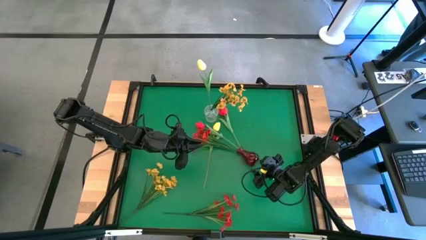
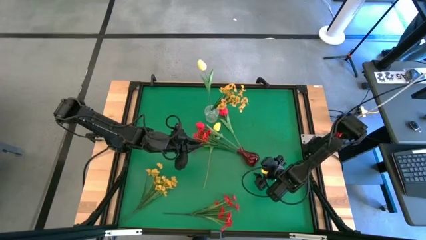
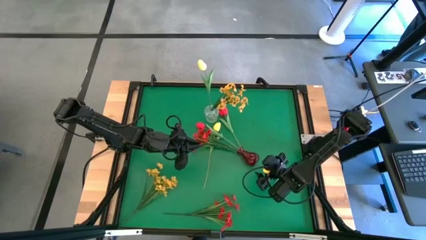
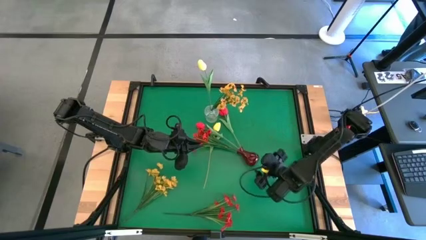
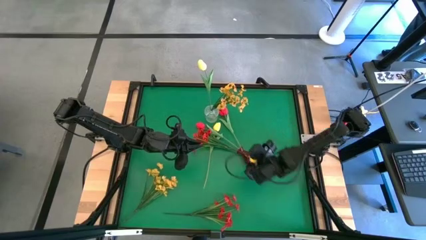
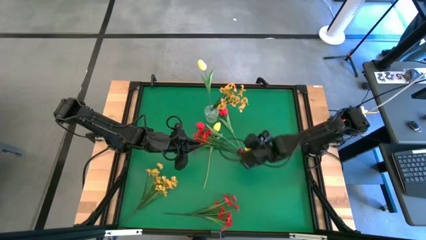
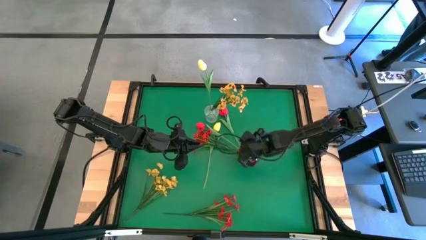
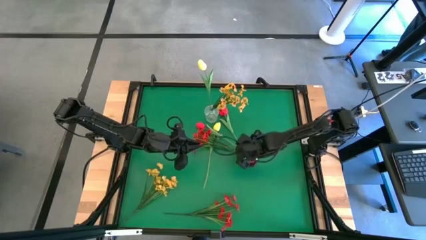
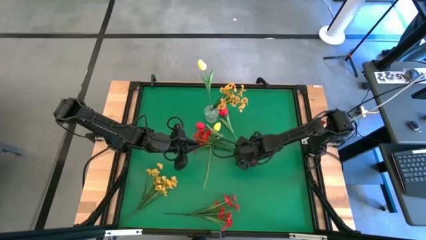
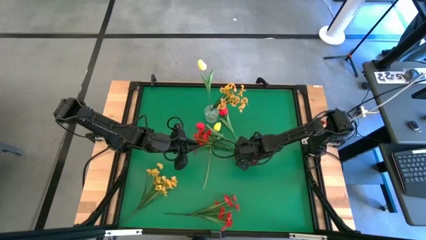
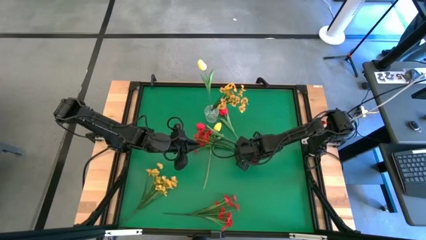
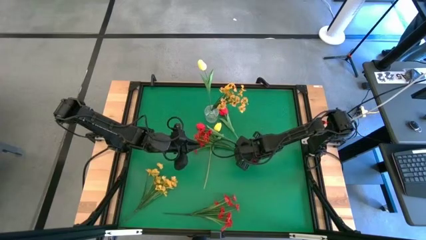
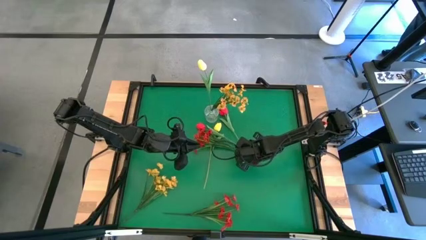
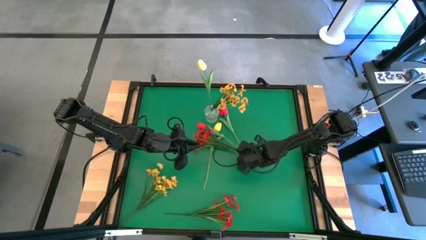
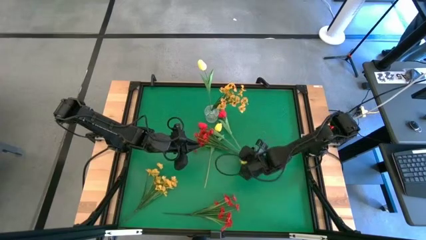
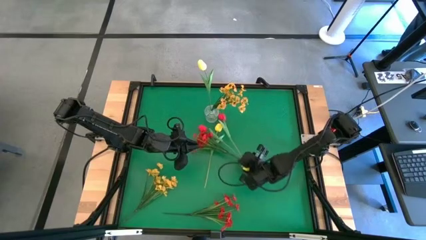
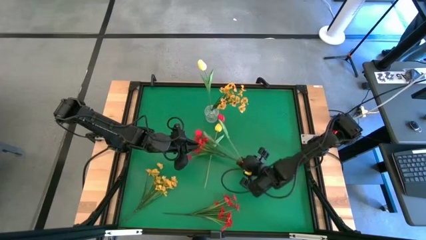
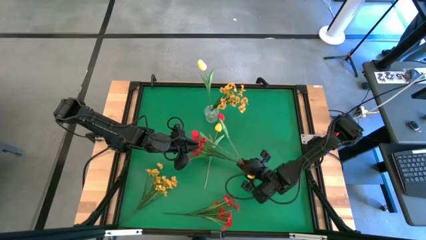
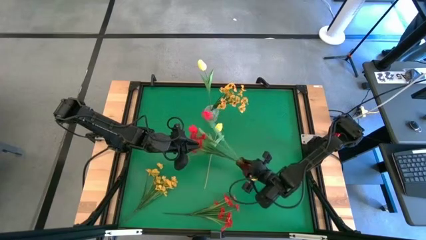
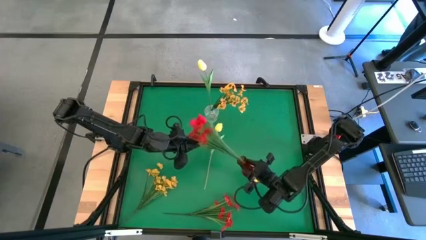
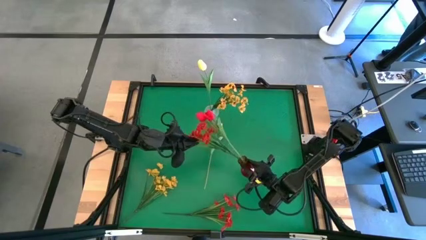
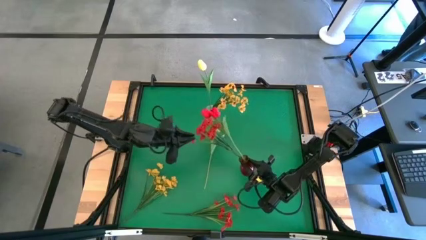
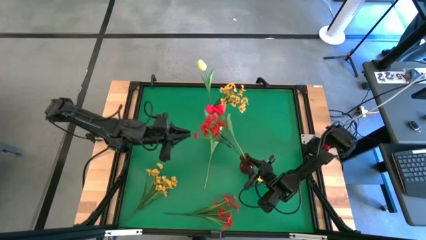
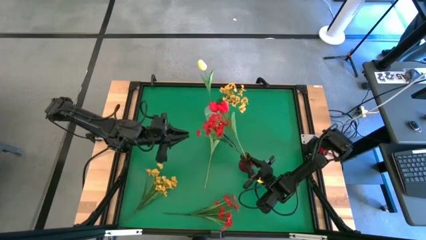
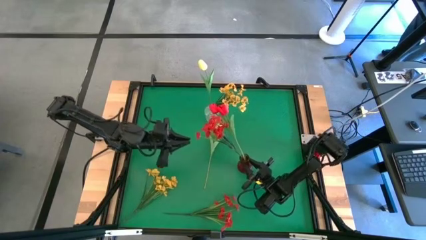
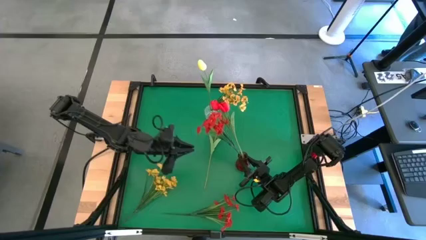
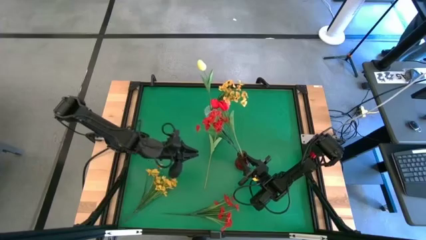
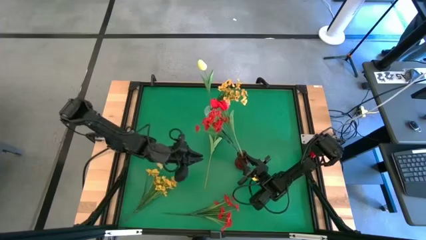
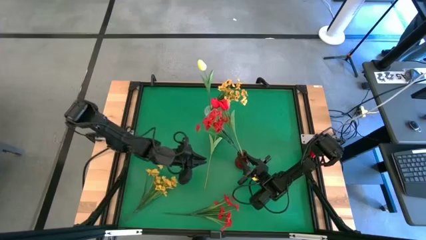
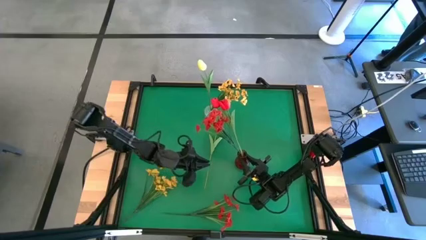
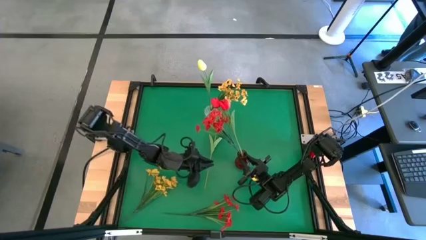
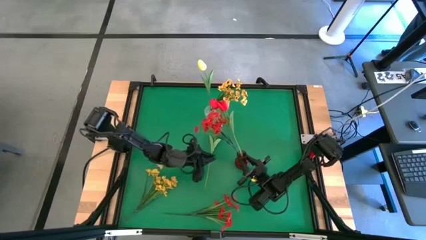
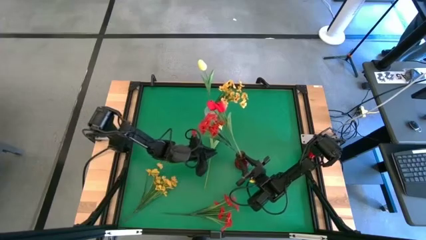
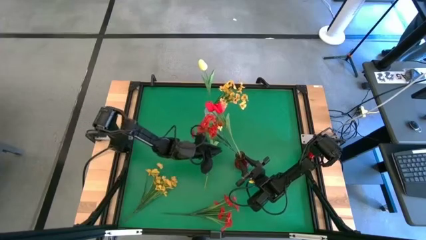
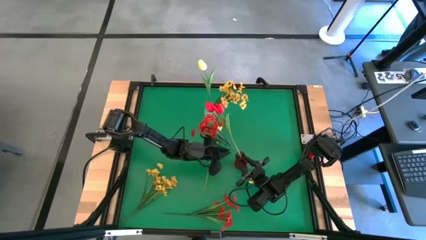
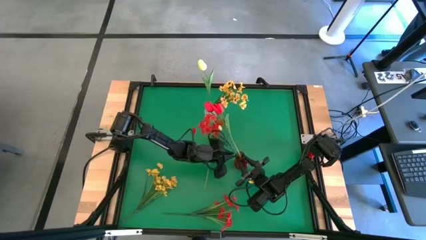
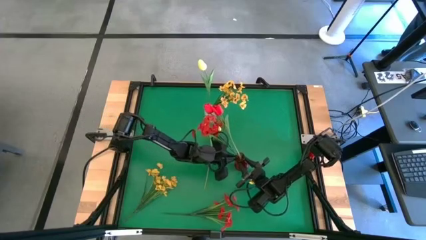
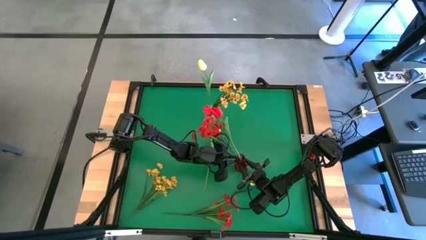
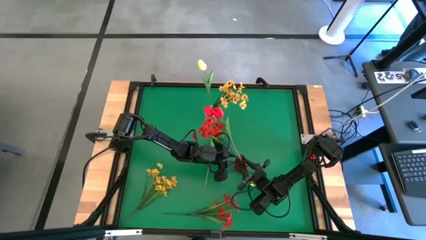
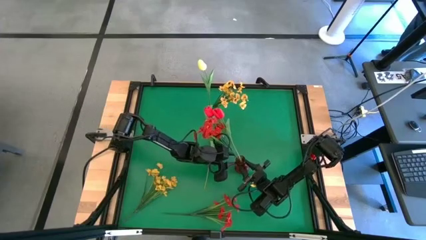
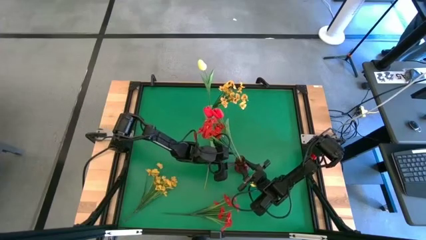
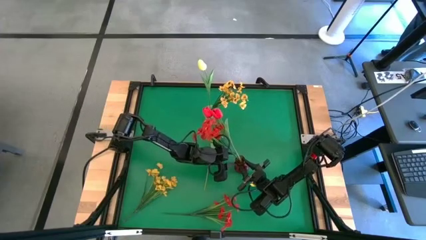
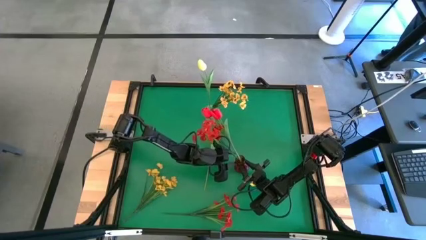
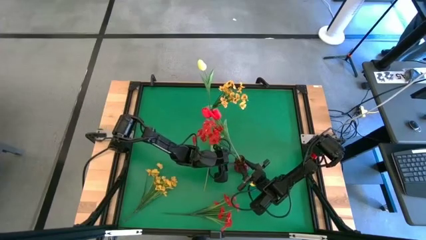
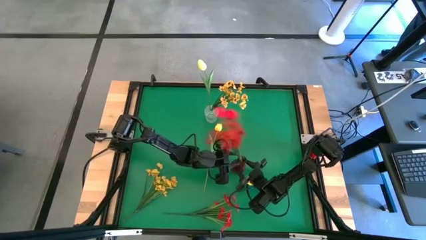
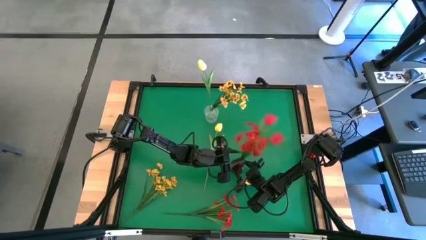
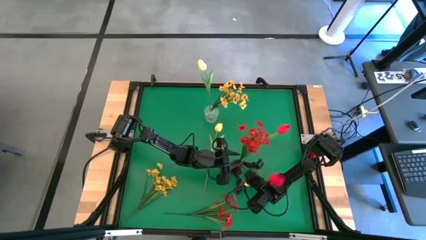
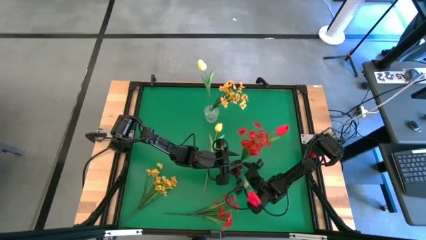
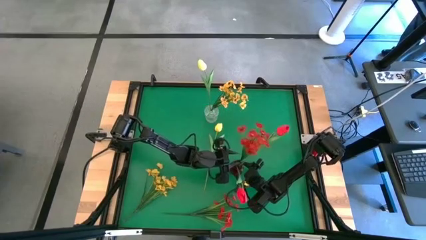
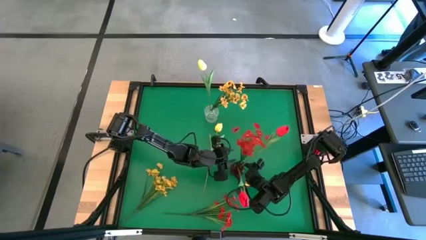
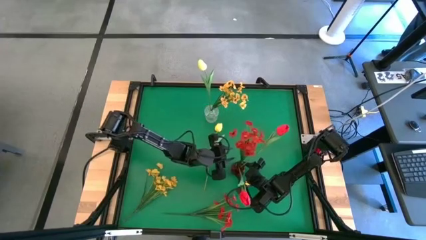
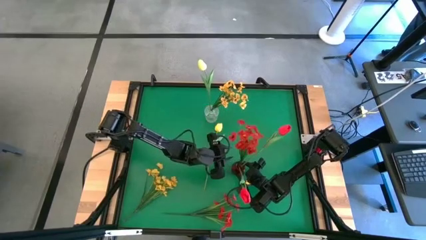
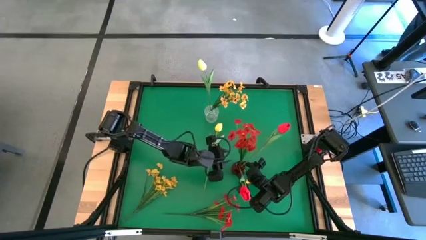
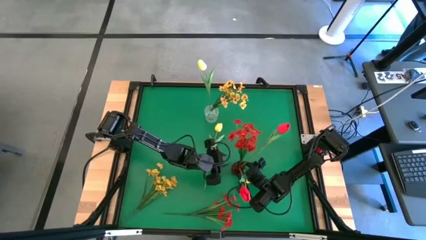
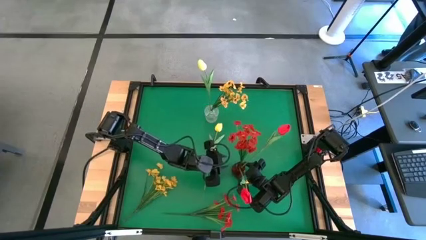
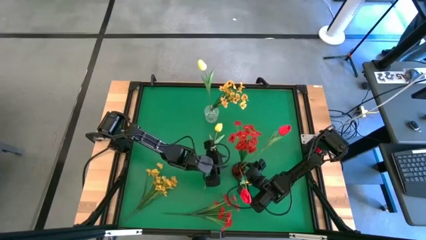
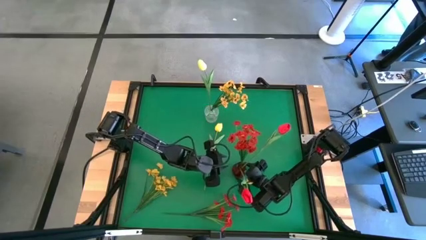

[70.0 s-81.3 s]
Task: Sort flowers into vase by color
Adjust the red vase

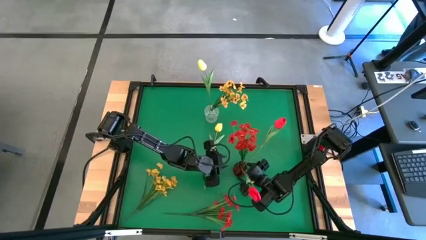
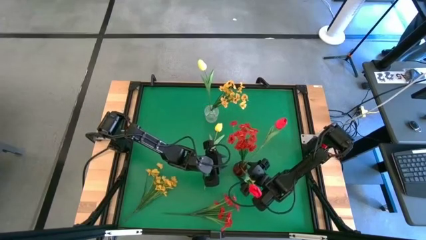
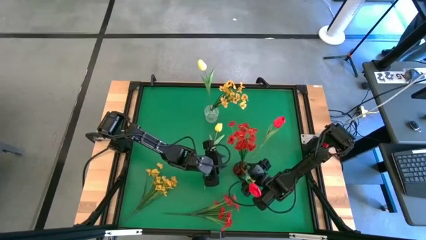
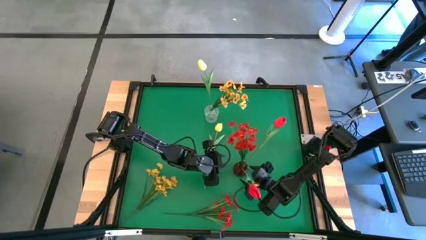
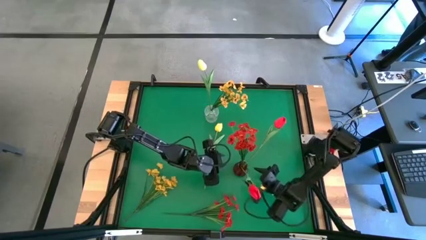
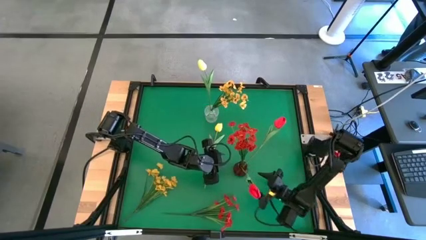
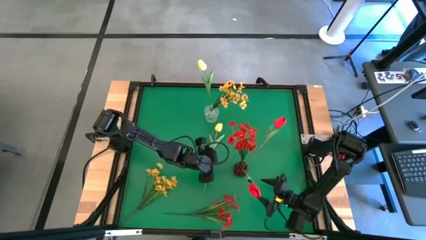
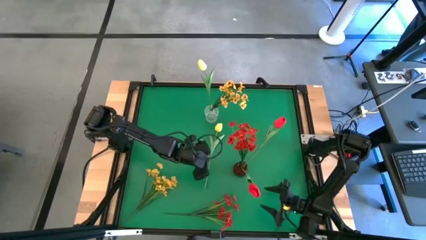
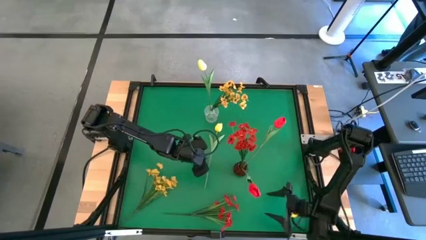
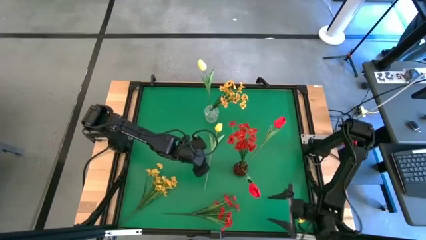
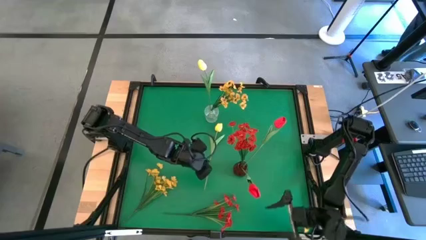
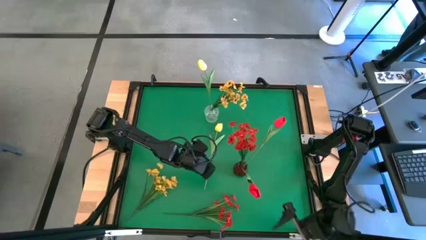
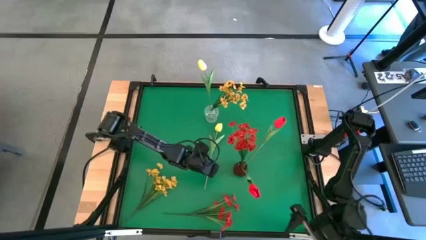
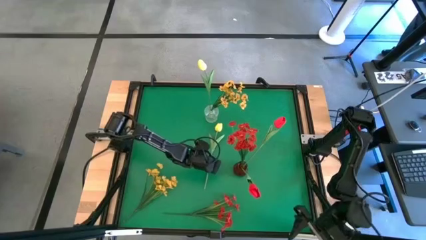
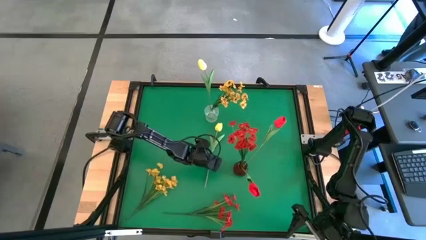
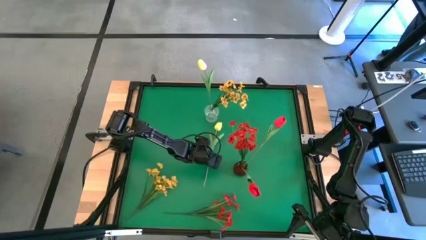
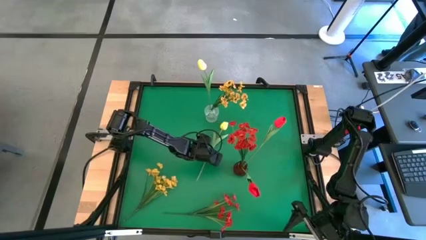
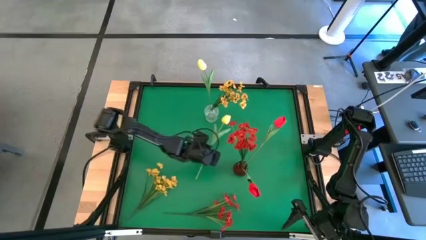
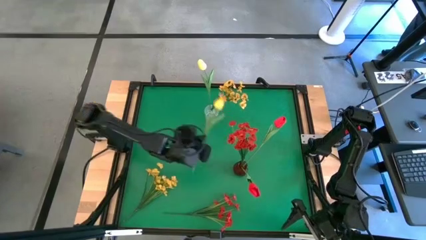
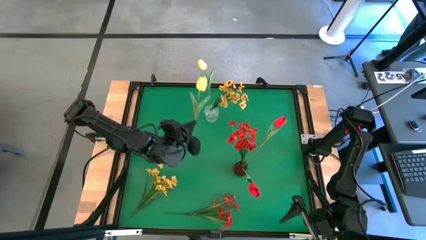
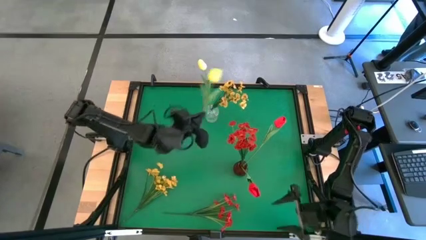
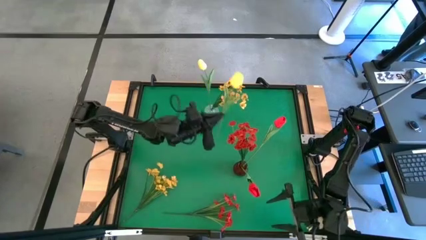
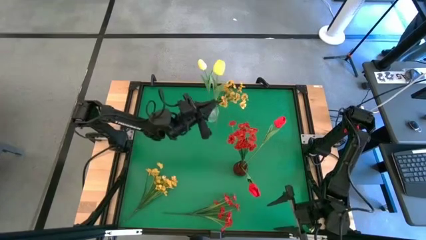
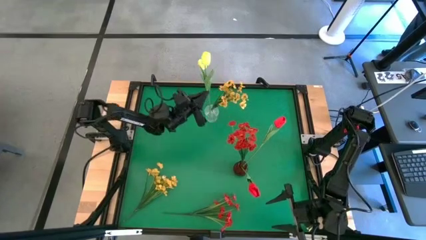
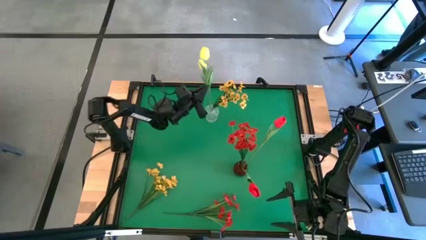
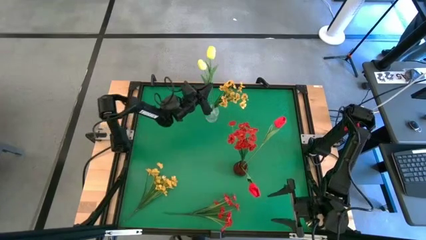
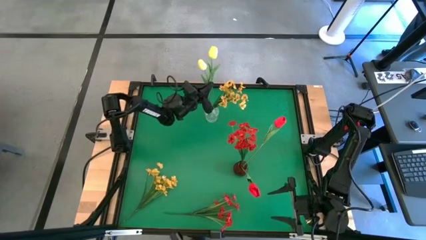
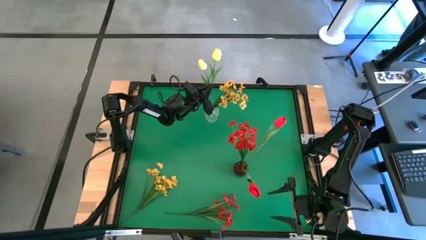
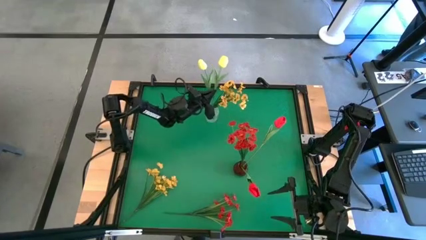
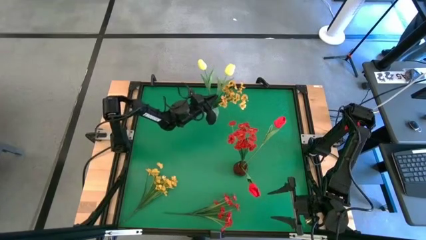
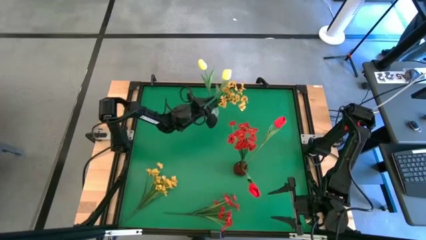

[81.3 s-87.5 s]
Put the top yellow flower into the transparent vase
